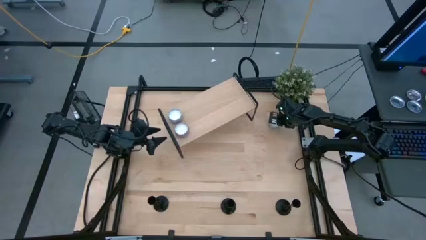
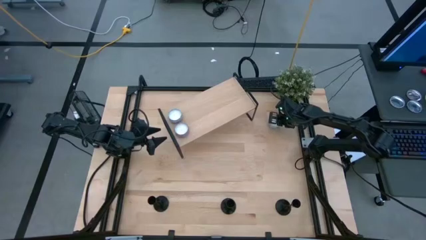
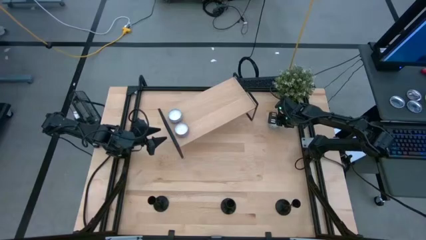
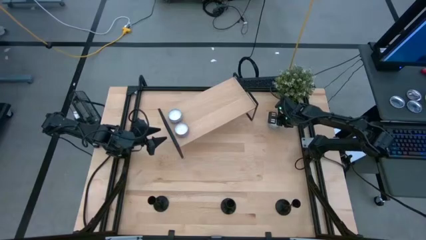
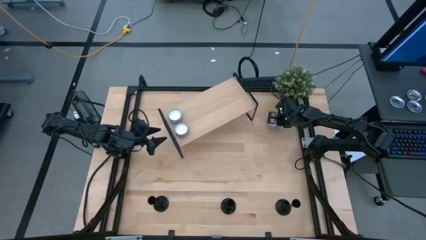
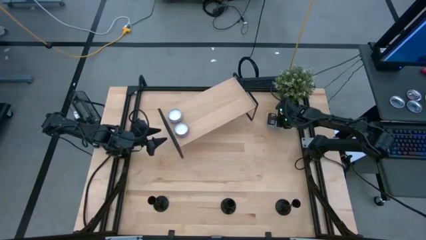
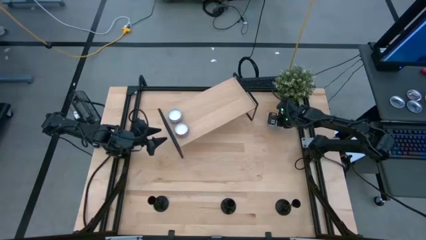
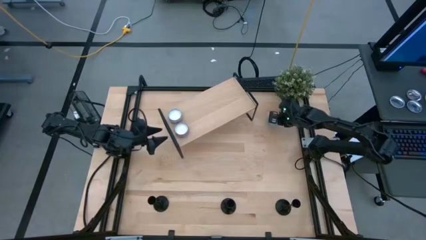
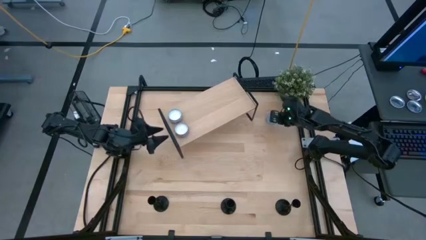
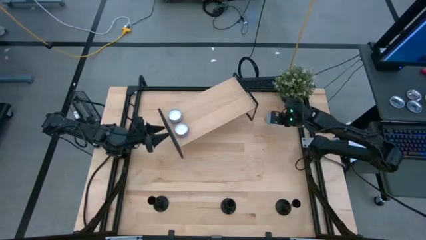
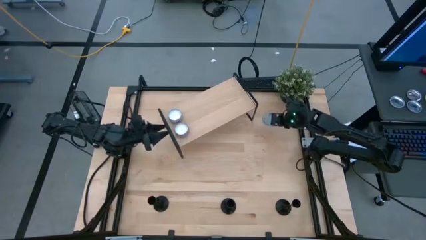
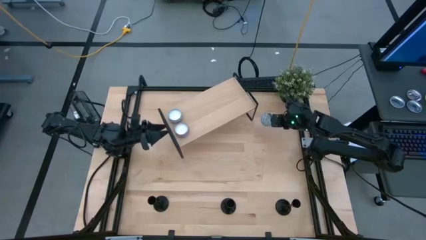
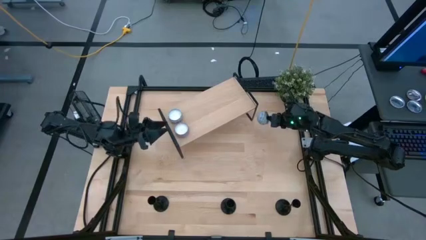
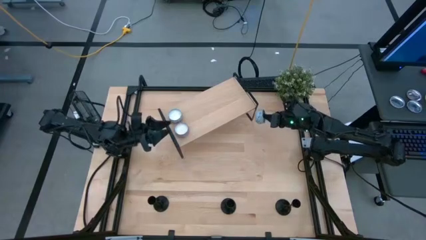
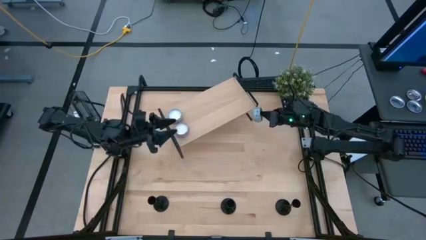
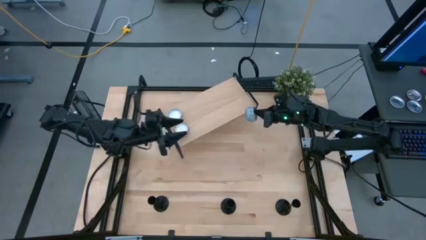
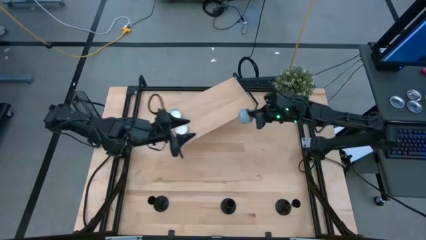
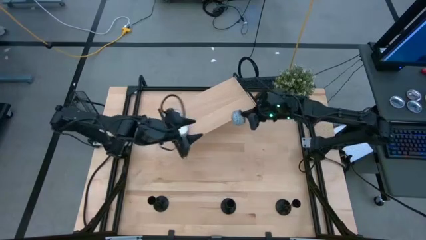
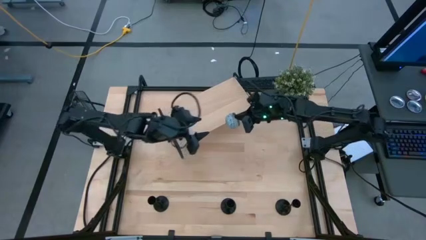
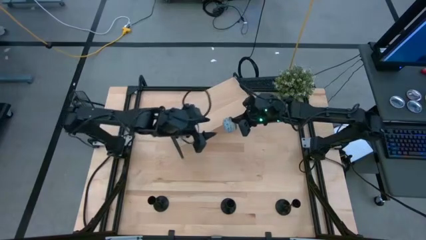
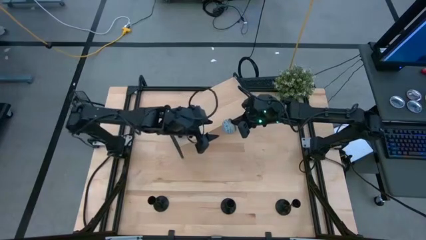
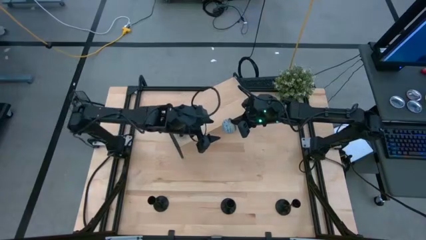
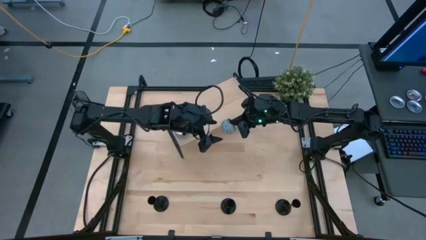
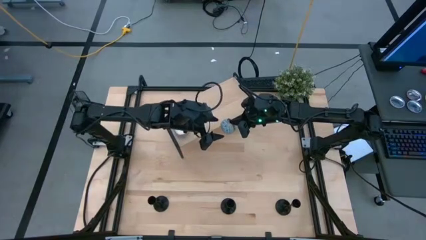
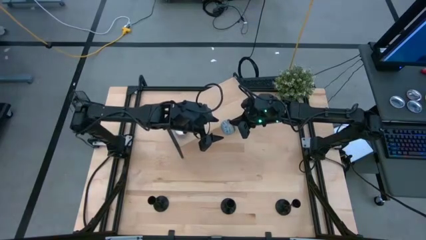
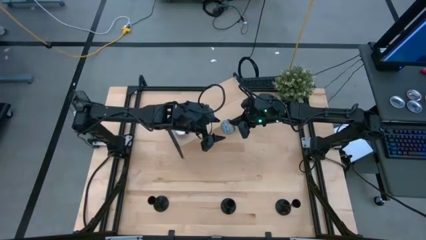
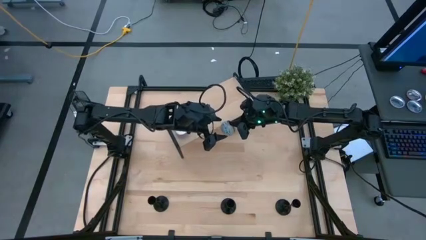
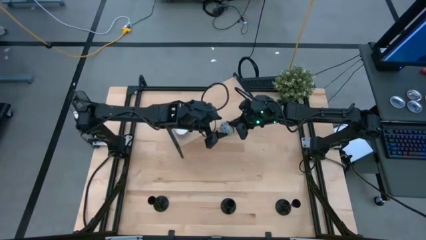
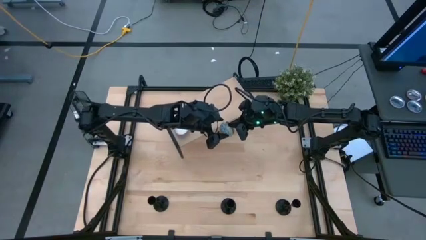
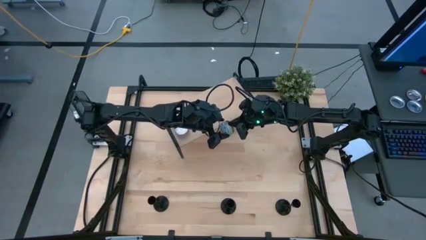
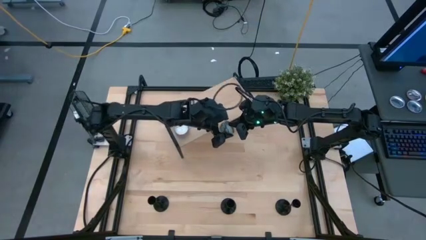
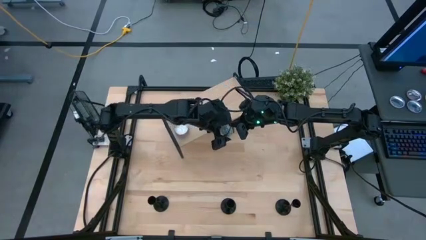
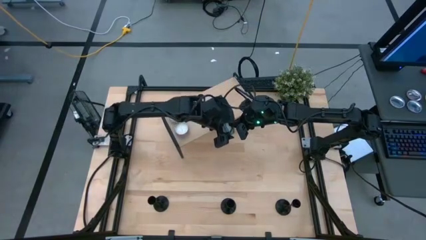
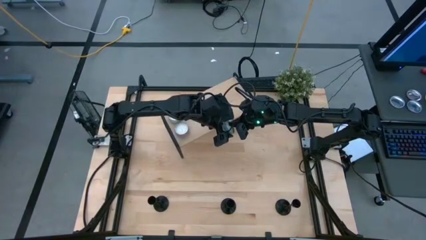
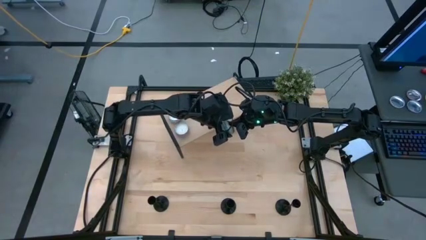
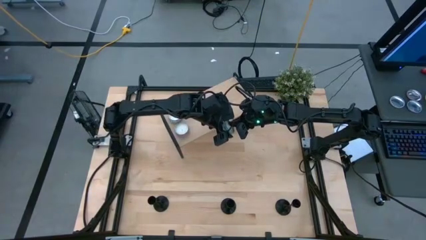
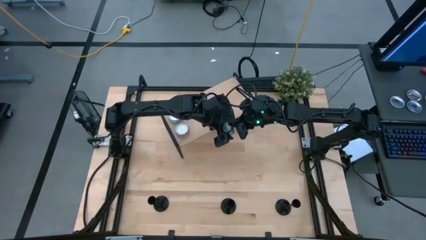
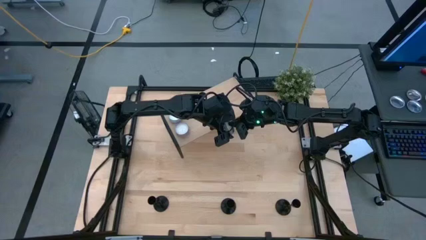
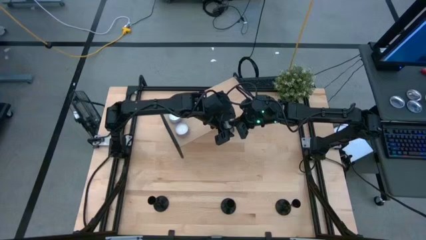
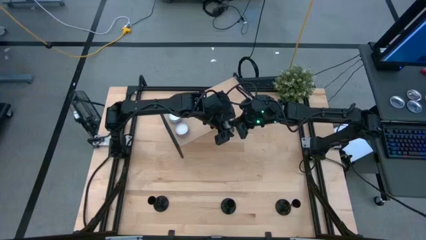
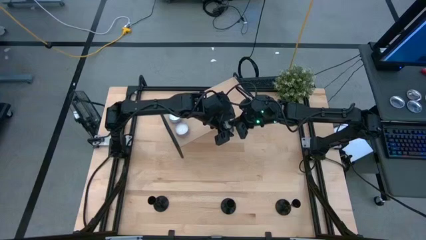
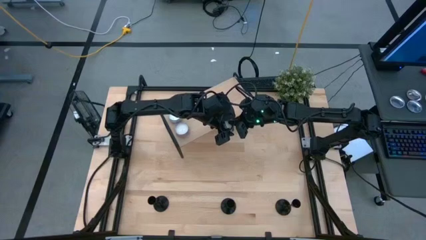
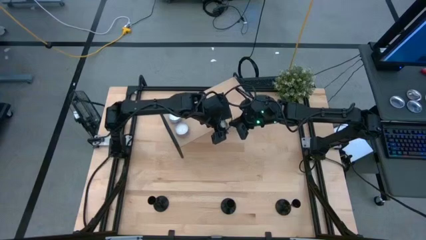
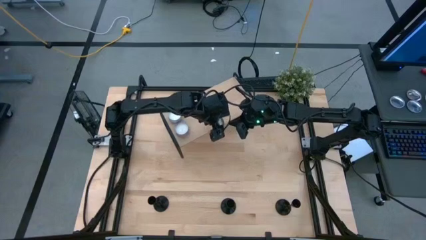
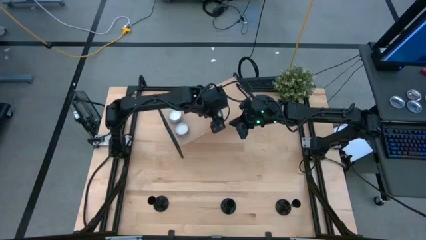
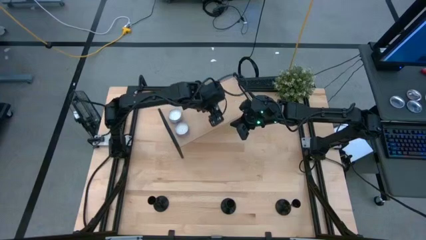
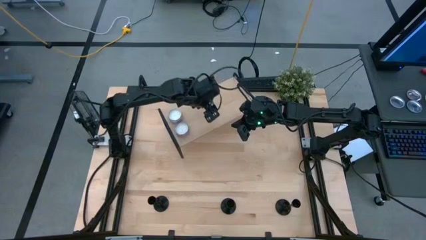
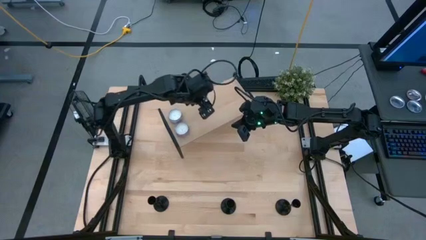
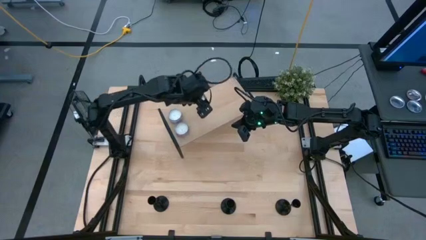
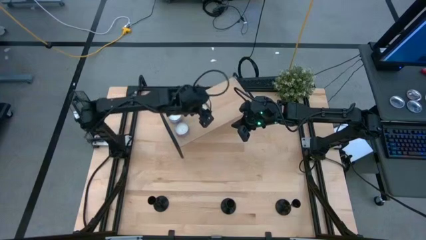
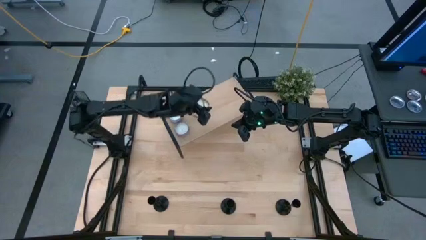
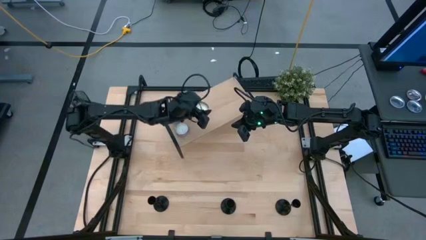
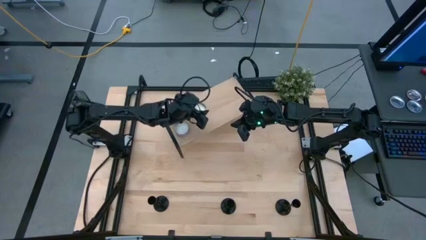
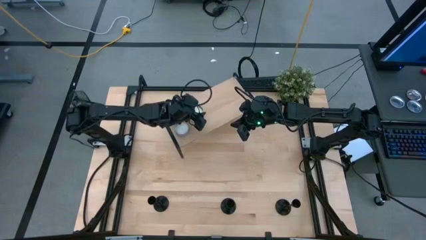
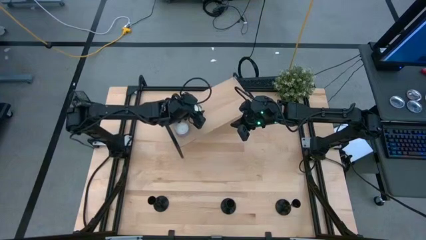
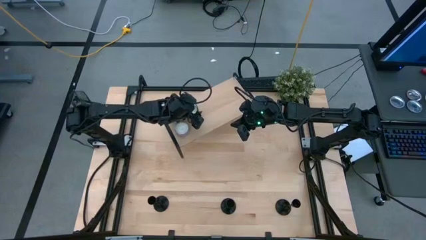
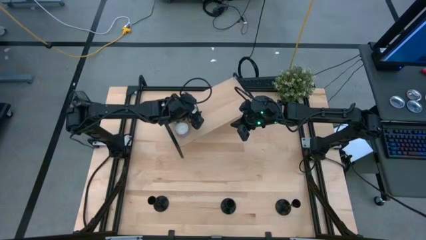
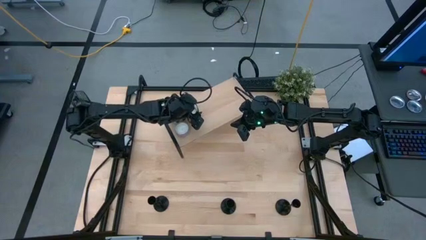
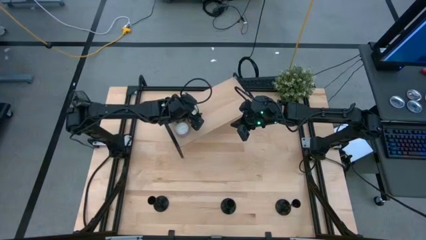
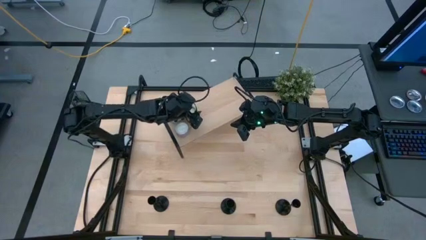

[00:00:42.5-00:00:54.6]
Task: Pick & Place candle stick holders
Put the blue patterned scented candle on the shelf

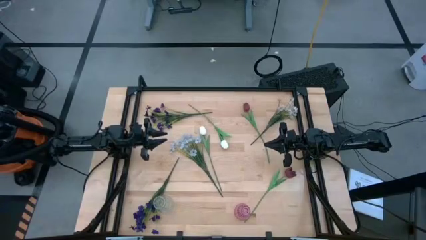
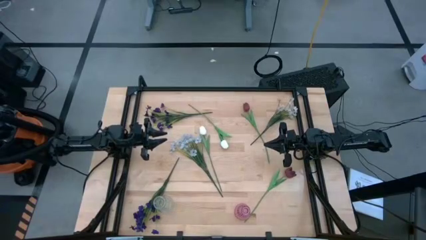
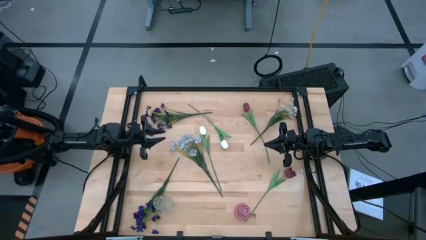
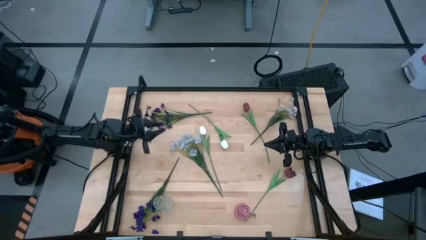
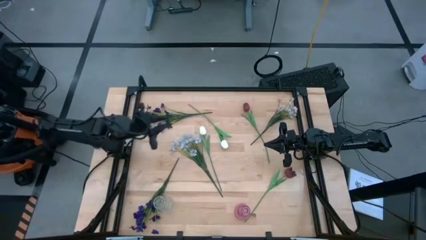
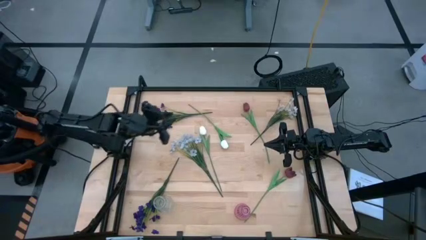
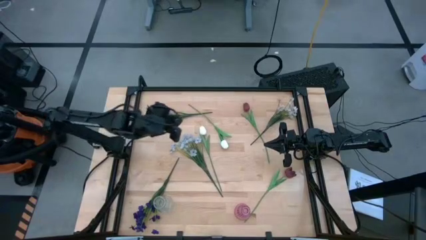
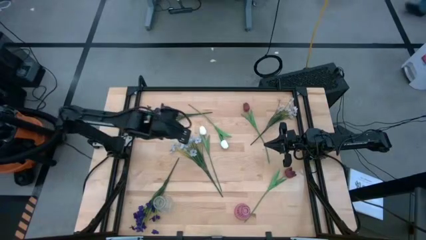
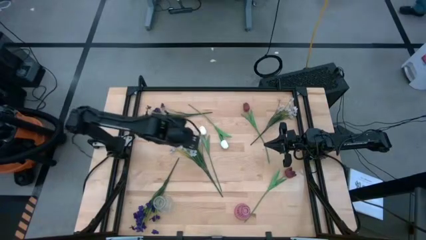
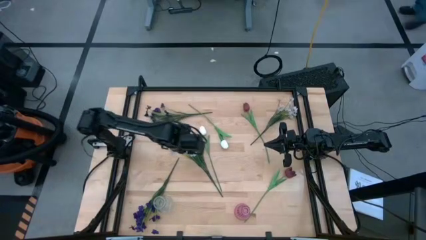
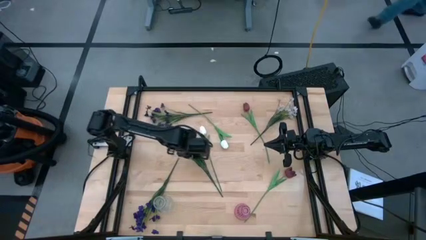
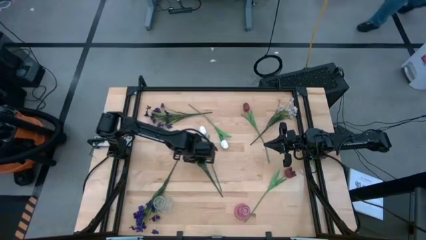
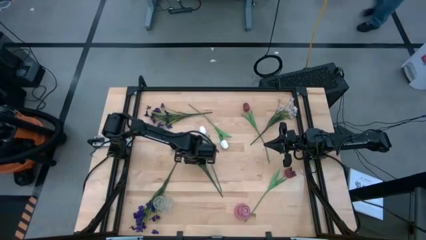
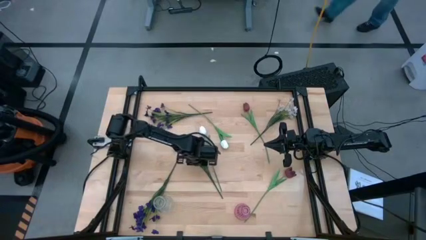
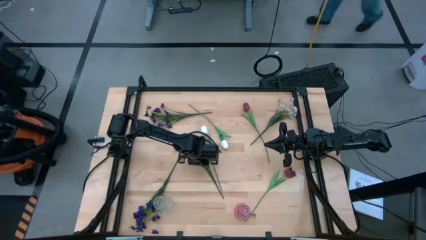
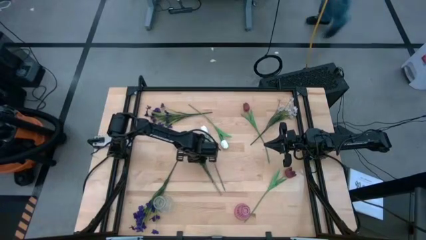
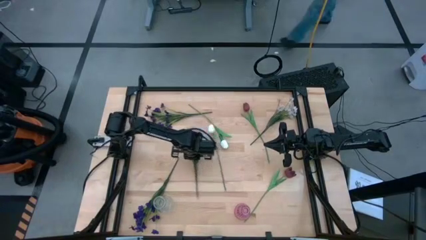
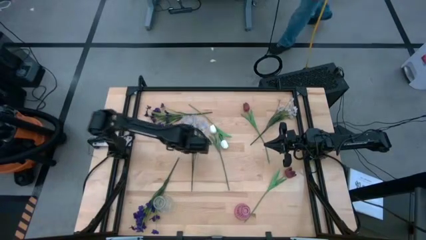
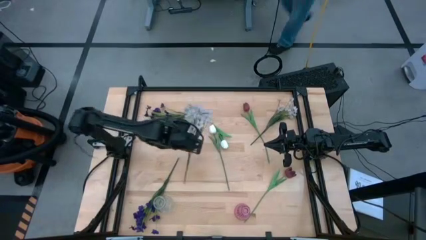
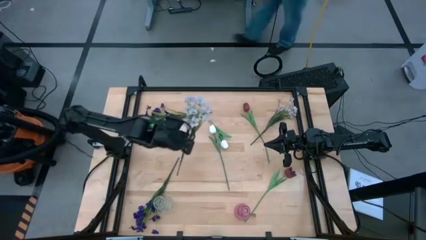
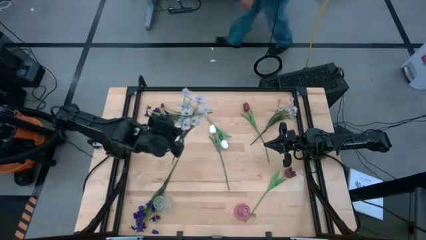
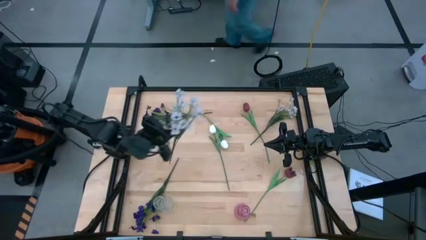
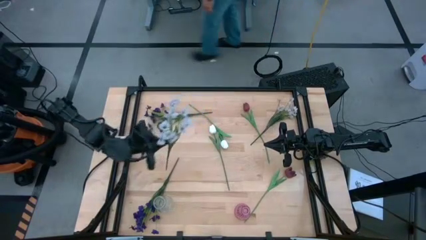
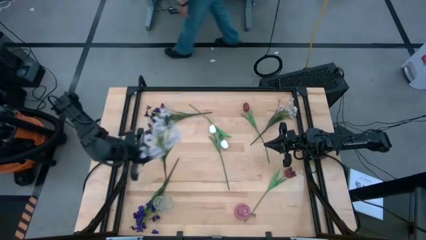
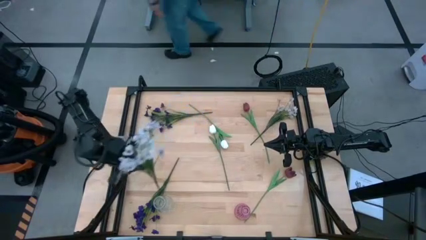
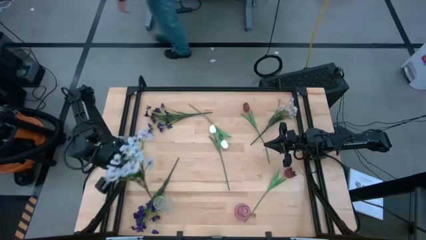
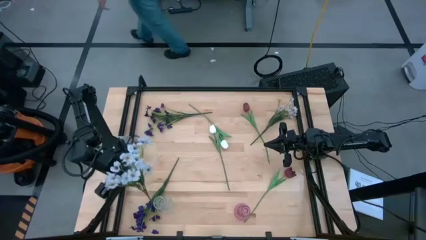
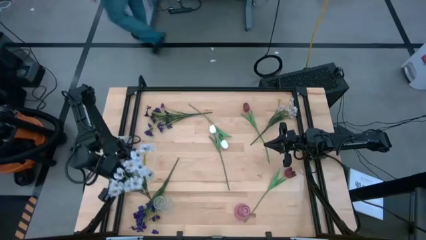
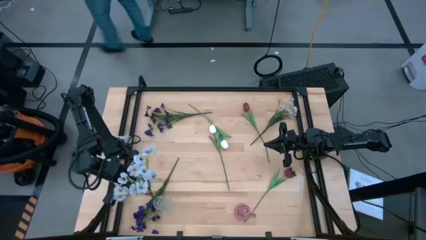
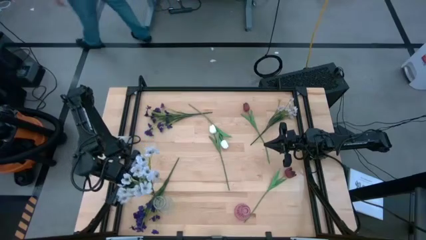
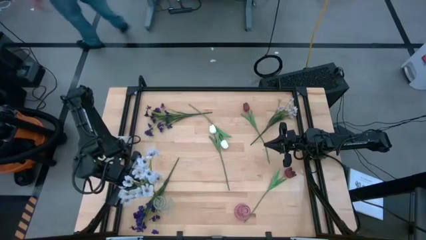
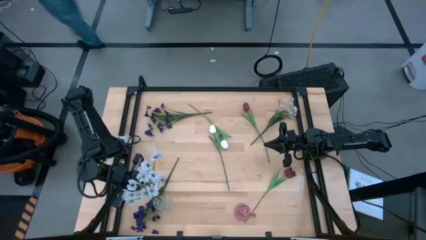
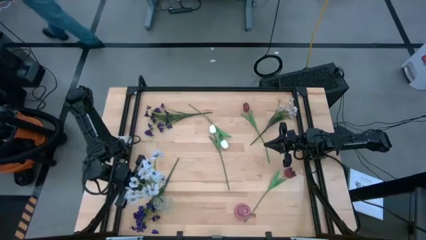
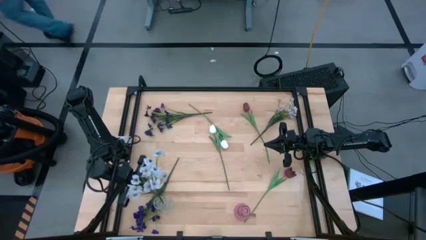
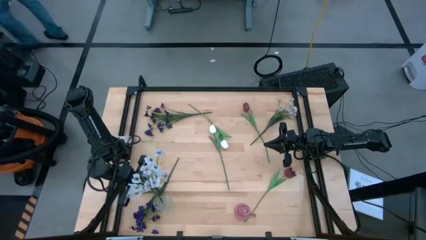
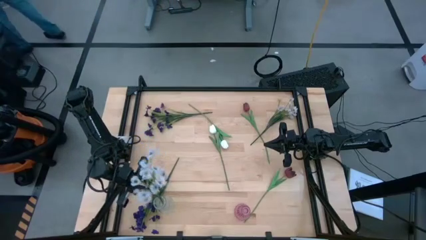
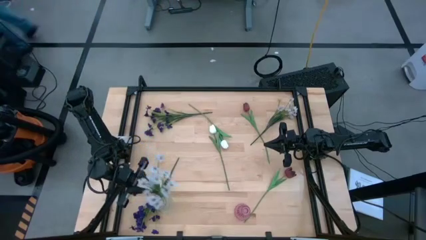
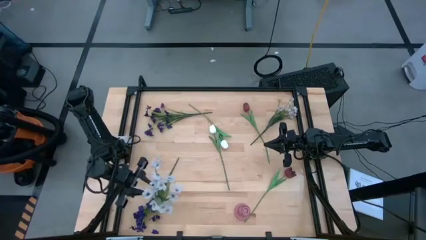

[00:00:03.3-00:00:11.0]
Task: Sort flowers into vase by color
Put the left white flower into the transparent vase
